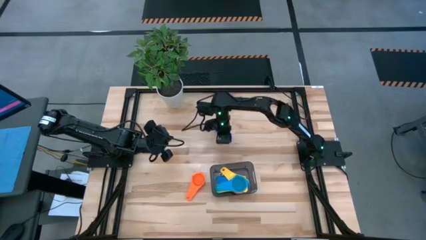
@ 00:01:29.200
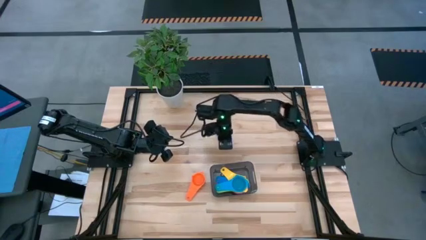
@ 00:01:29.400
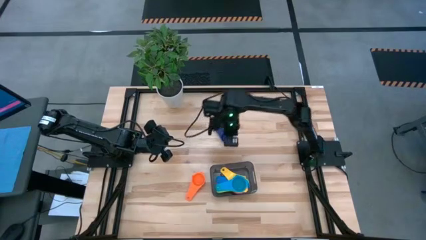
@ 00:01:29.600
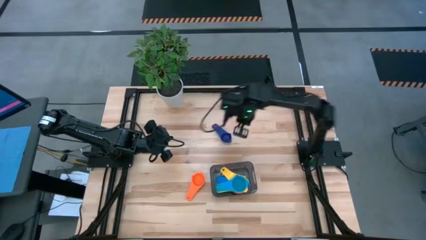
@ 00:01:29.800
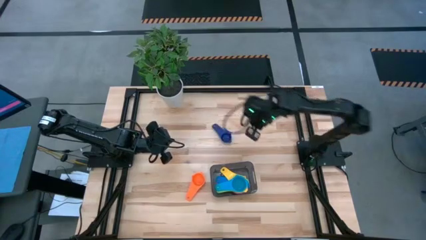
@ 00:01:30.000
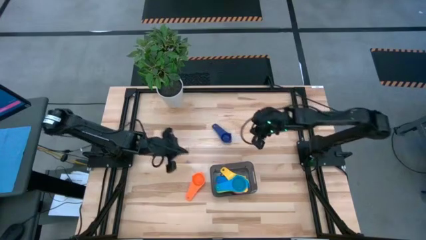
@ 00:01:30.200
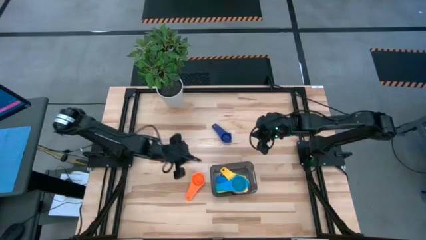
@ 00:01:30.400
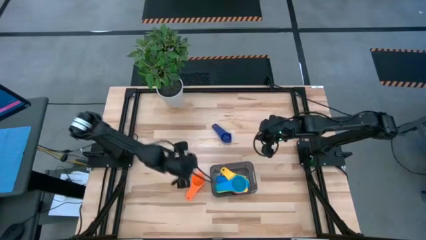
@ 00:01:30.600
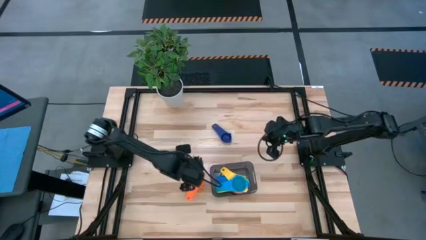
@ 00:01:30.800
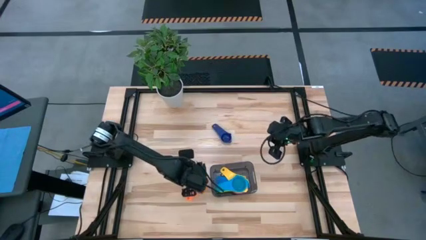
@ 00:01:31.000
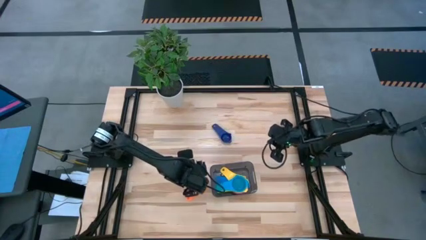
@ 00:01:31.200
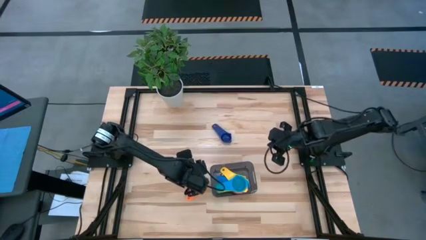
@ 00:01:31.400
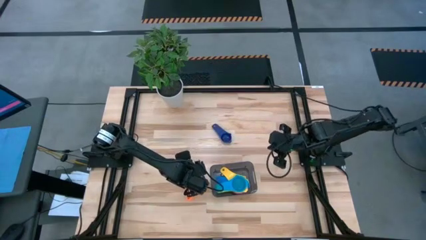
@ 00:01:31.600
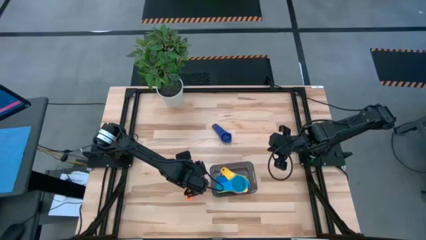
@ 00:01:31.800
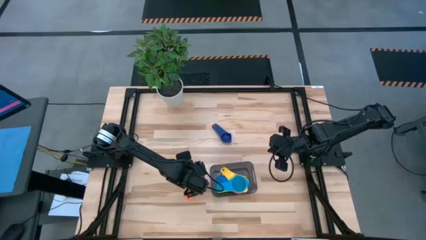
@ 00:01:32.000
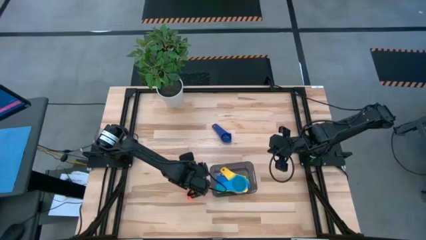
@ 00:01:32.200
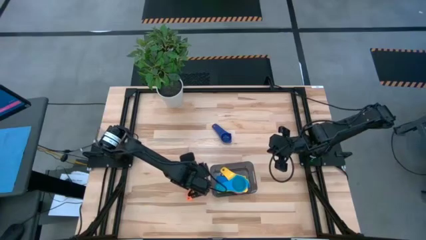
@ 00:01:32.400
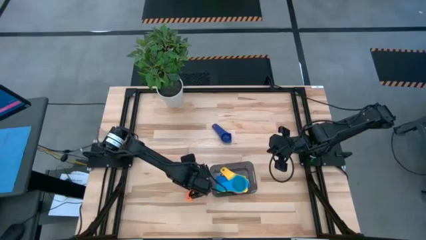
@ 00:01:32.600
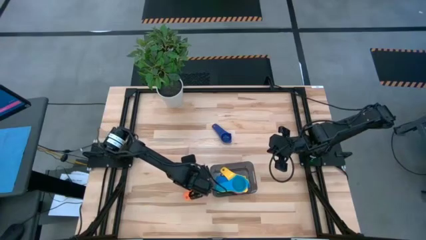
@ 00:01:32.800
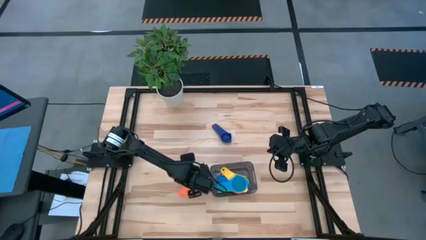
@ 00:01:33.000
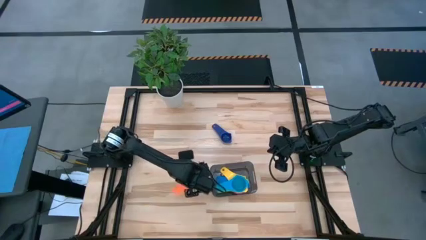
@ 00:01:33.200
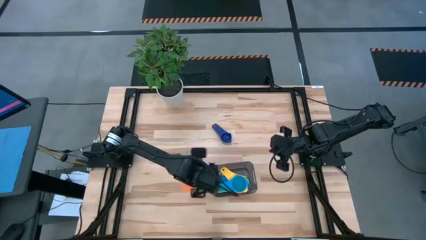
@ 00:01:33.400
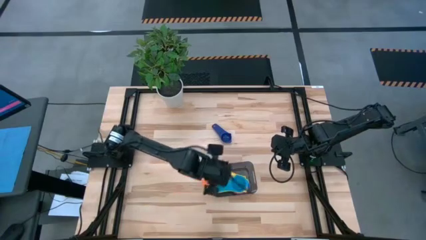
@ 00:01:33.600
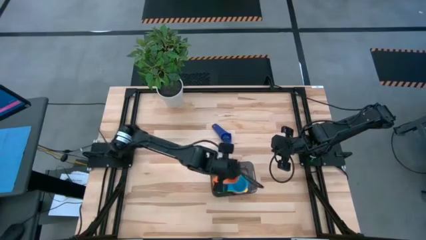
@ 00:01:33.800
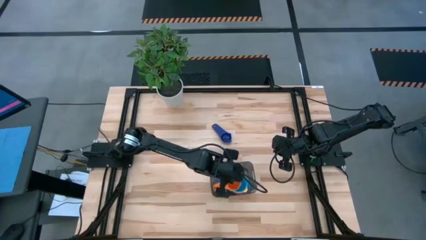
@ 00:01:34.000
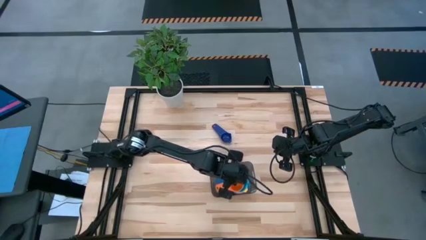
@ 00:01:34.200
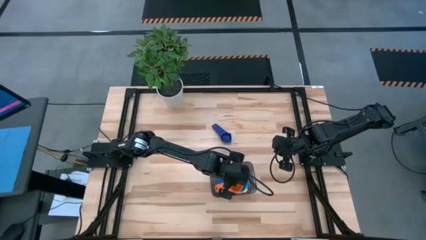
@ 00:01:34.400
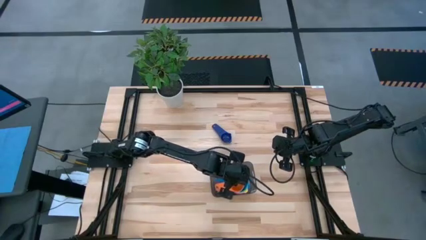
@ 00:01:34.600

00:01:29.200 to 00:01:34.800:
Task: Nest measuring cups in basket
Stack the orange measuring cup on top of the light blue measuring cup in the black bin

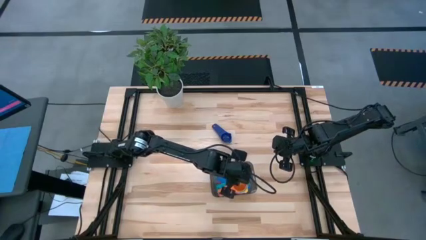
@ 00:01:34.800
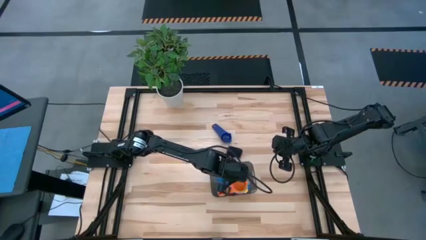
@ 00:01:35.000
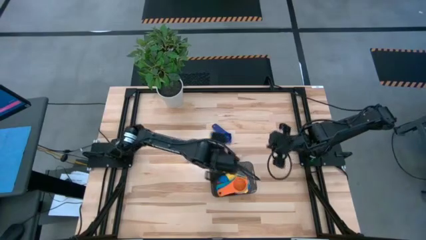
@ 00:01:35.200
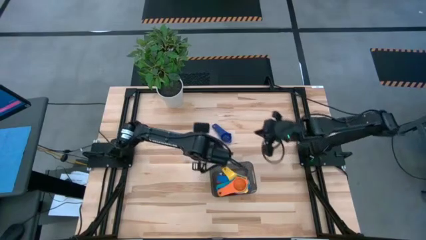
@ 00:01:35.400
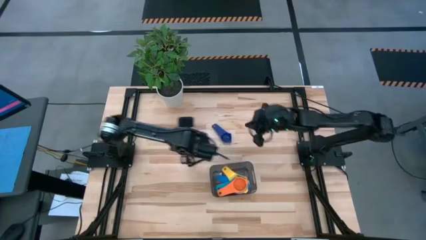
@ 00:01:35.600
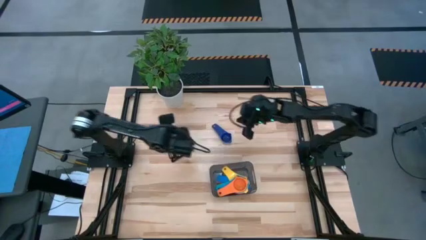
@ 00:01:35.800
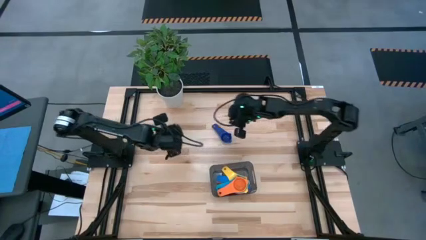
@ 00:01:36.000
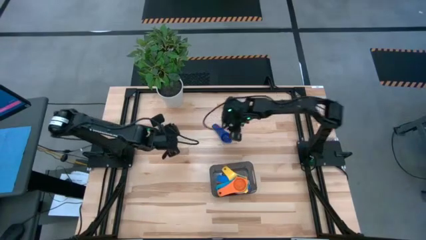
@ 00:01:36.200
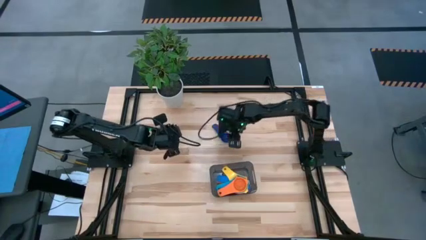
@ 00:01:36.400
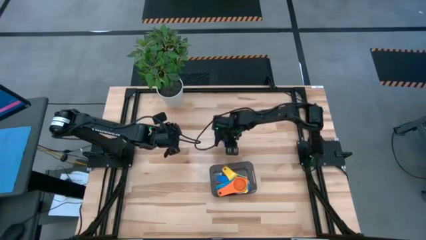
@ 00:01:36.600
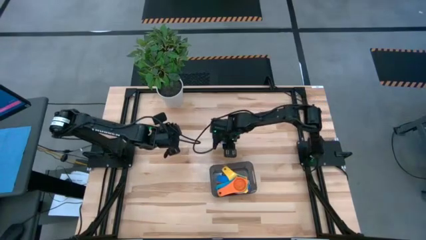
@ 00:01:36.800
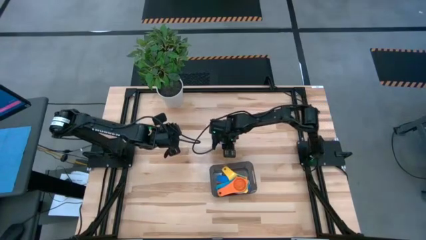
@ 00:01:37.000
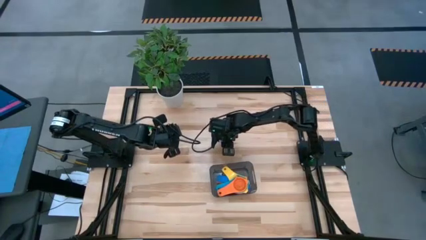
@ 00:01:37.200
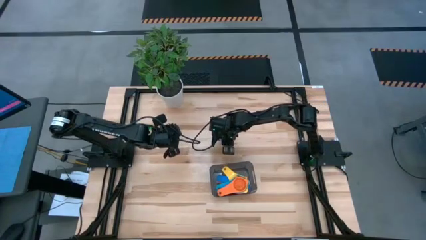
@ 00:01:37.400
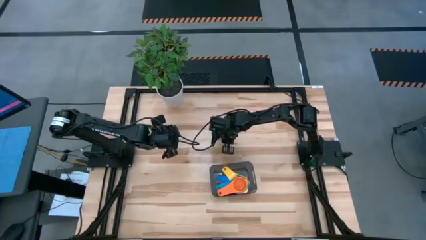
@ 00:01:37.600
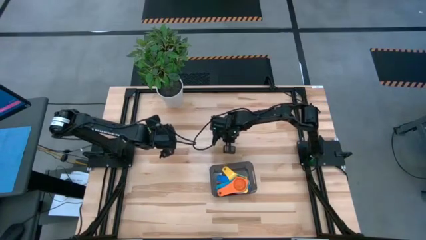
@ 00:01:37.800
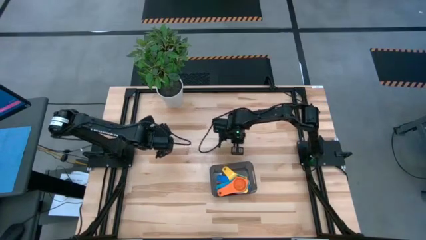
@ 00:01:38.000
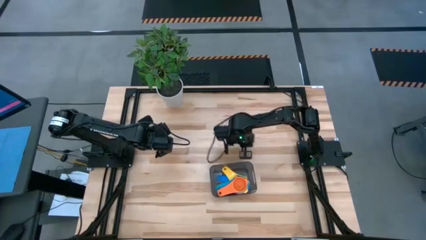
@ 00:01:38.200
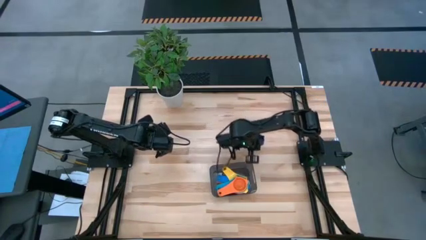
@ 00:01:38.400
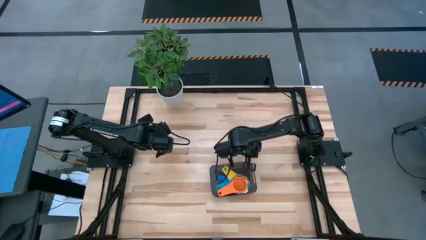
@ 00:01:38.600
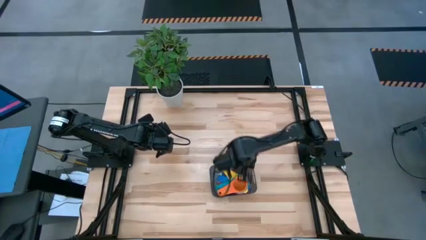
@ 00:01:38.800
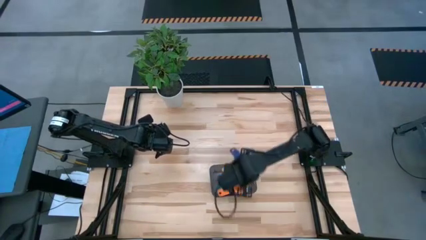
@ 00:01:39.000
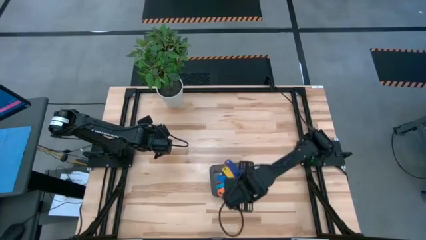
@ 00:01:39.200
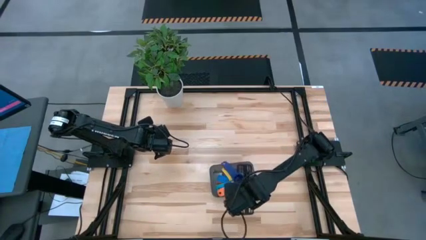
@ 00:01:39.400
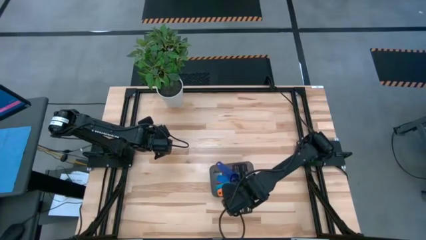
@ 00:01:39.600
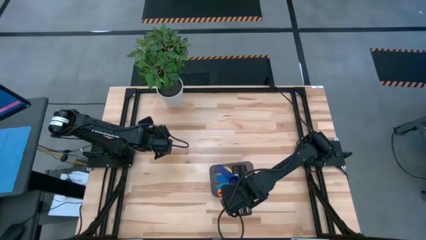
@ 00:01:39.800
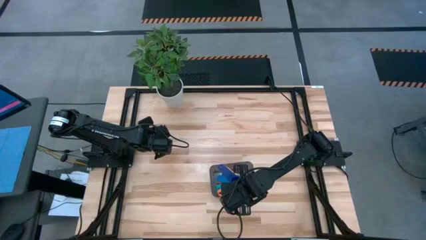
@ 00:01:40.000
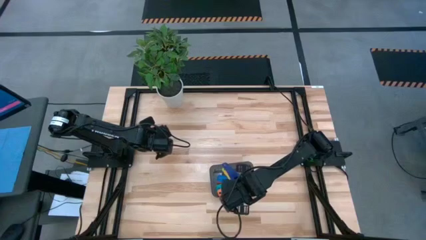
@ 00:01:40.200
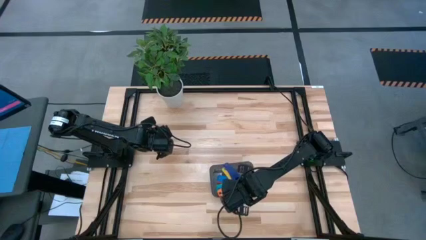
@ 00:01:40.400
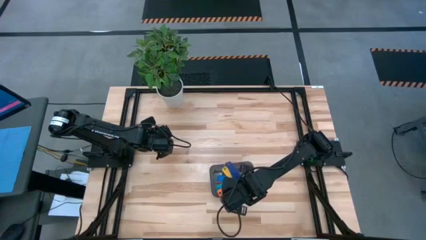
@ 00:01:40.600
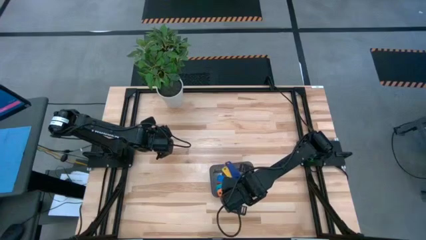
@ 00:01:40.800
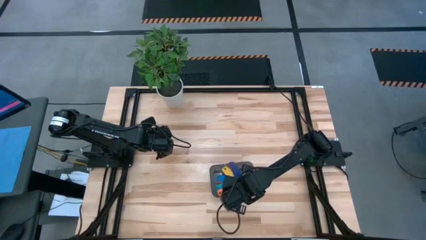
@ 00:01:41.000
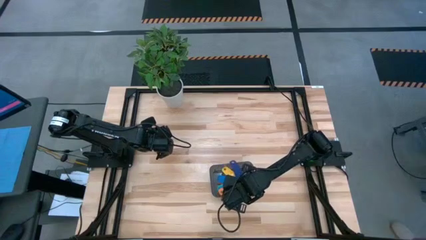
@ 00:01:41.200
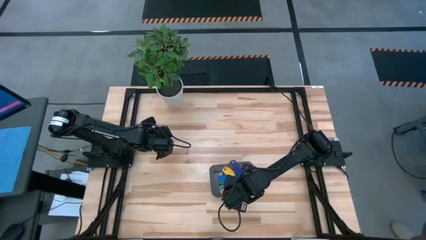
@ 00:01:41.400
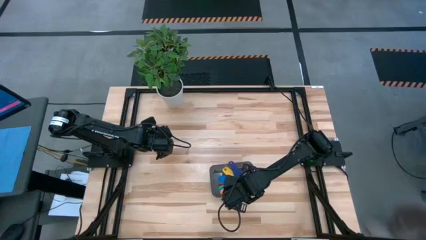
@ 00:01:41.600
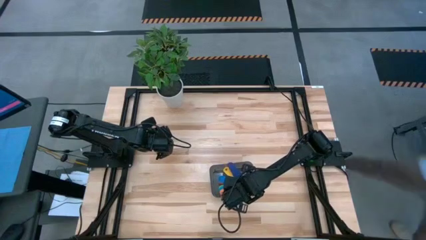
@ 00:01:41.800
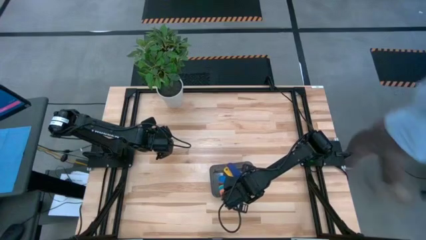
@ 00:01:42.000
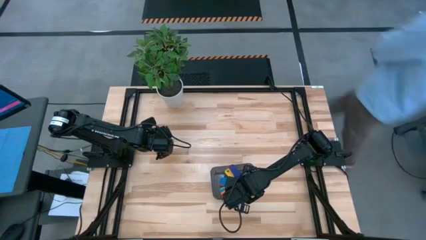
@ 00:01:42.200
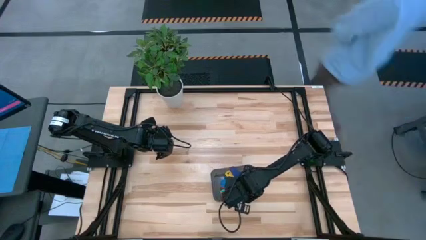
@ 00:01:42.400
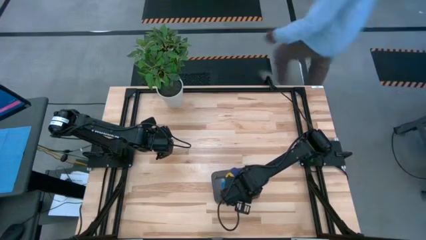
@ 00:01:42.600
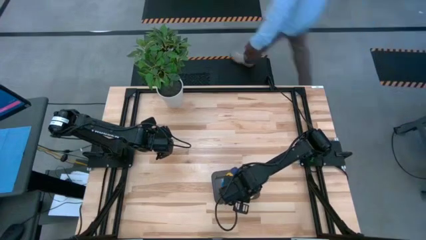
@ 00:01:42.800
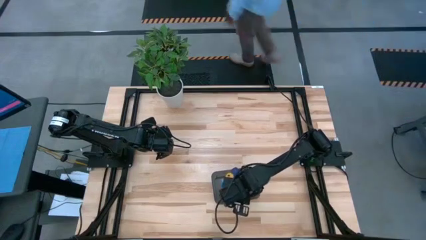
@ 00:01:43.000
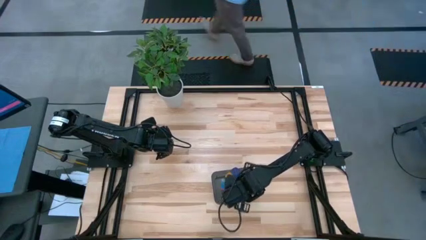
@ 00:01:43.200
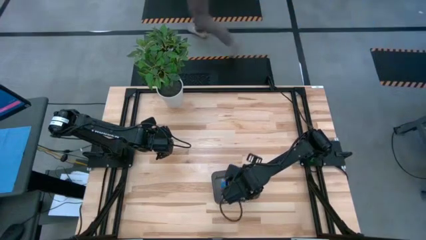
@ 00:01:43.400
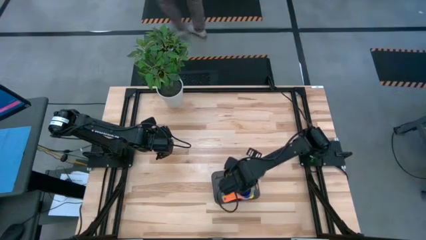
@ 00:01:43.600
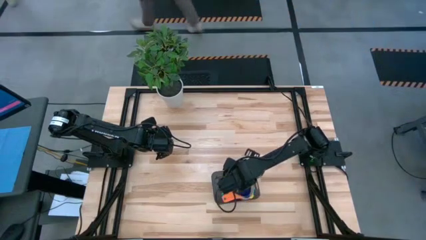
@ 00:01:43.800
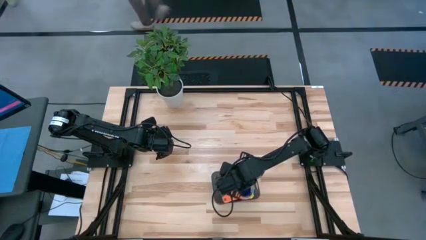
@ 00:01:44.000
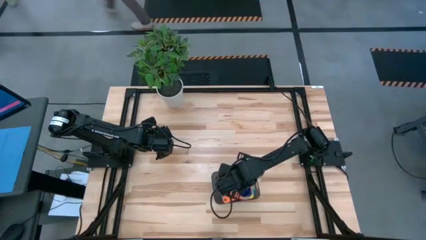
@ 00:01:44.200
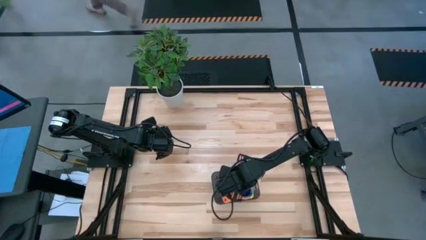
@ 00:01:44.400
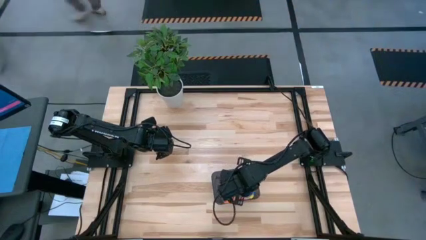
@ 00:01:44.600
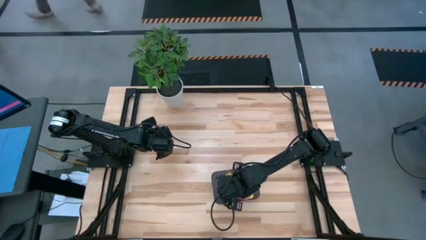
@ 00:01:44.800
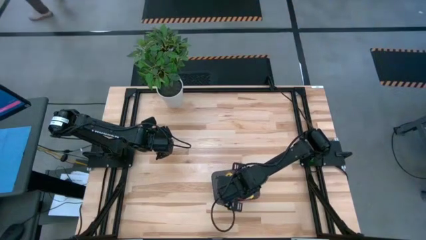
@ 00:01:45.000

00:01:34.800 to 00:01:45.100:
Stack the dark blue measuring cup on top of the orange measuring cup in the black bin
